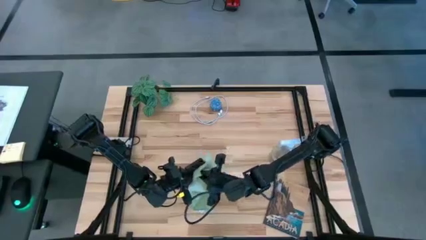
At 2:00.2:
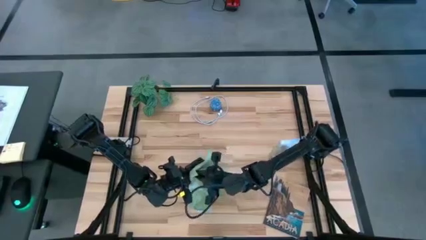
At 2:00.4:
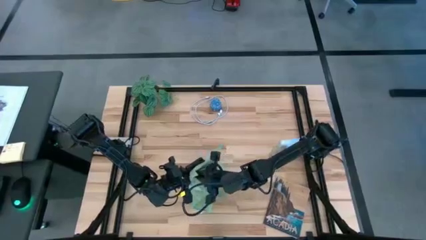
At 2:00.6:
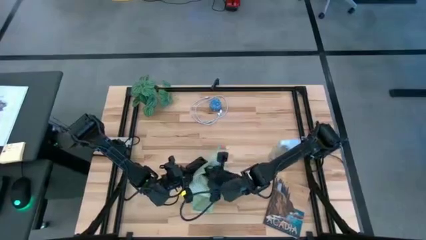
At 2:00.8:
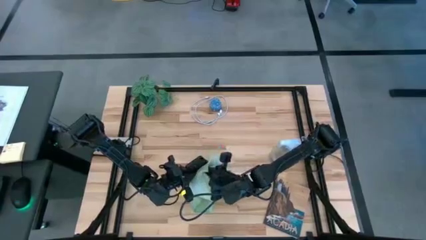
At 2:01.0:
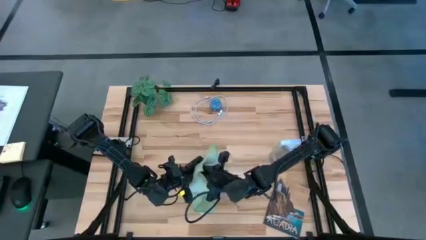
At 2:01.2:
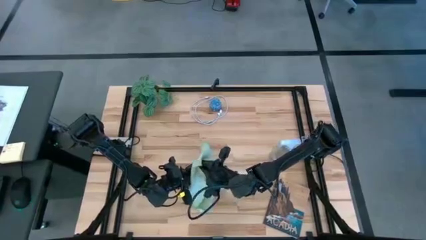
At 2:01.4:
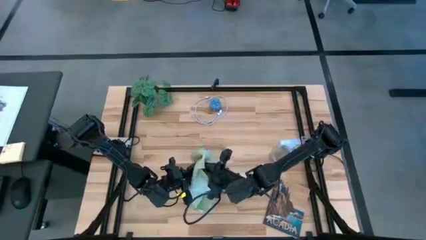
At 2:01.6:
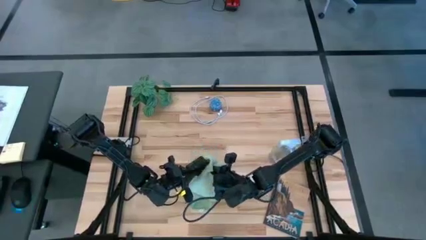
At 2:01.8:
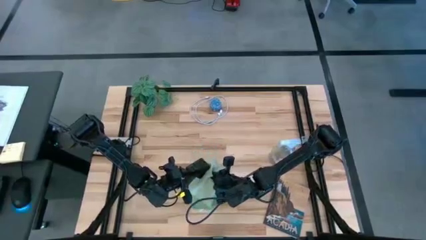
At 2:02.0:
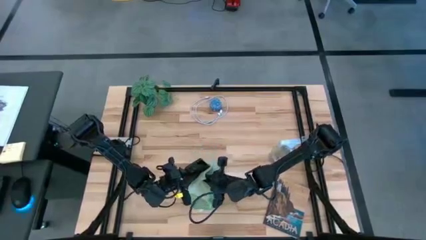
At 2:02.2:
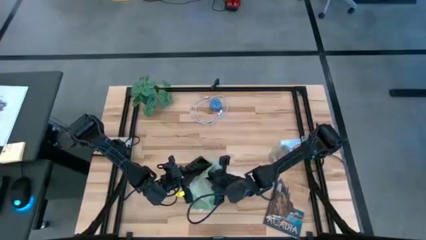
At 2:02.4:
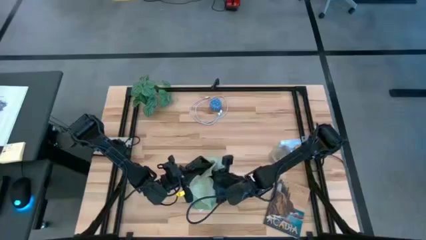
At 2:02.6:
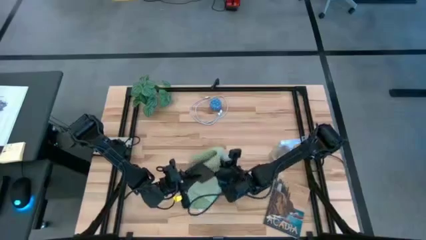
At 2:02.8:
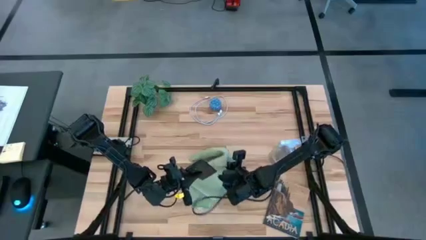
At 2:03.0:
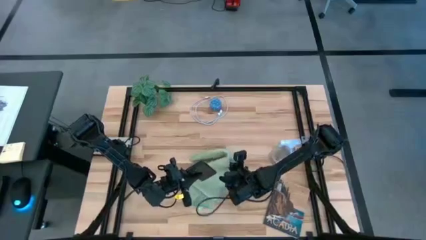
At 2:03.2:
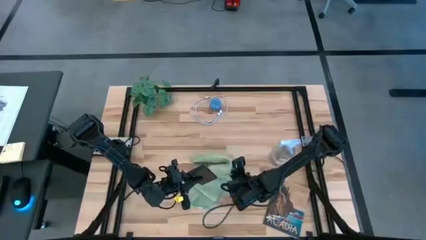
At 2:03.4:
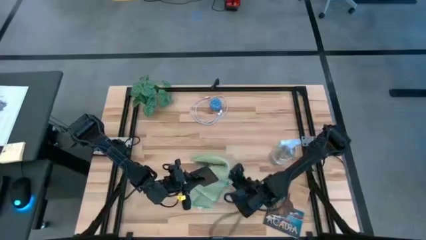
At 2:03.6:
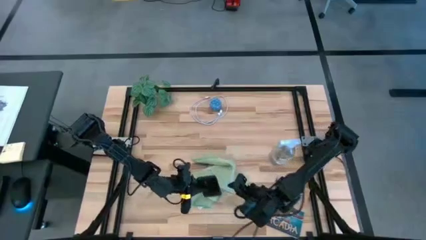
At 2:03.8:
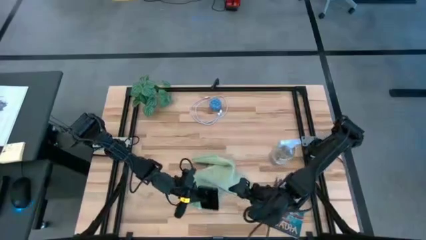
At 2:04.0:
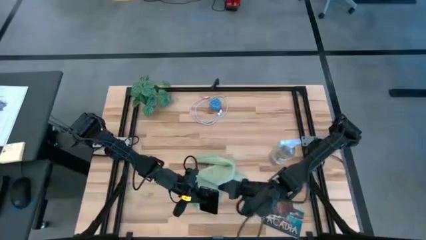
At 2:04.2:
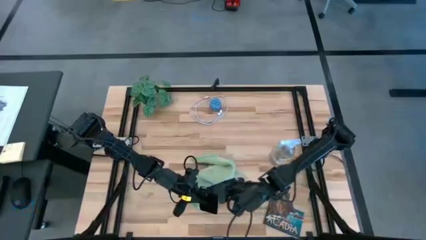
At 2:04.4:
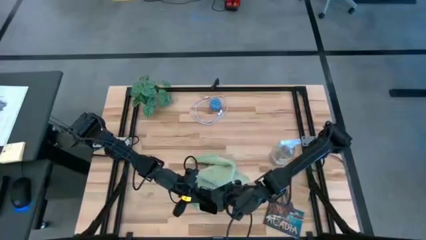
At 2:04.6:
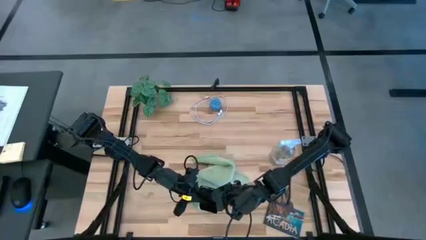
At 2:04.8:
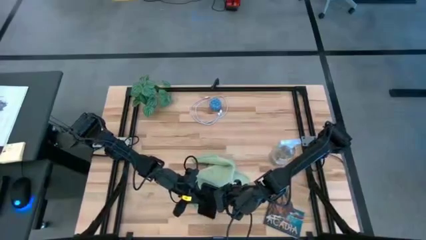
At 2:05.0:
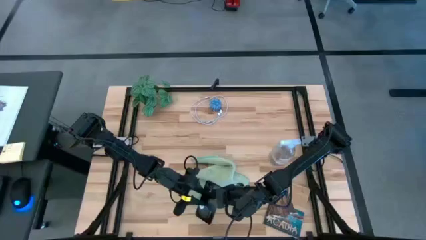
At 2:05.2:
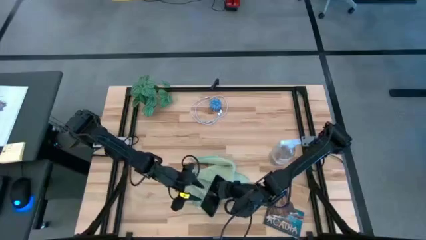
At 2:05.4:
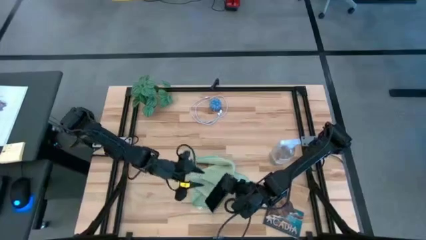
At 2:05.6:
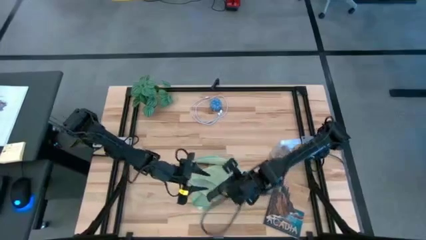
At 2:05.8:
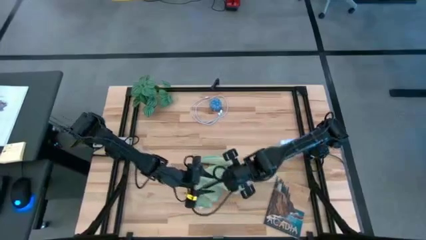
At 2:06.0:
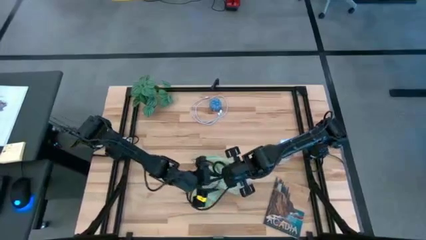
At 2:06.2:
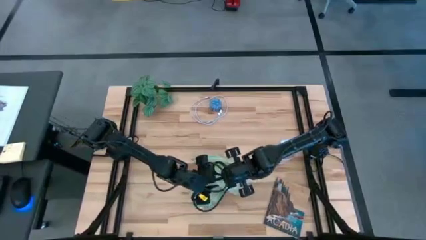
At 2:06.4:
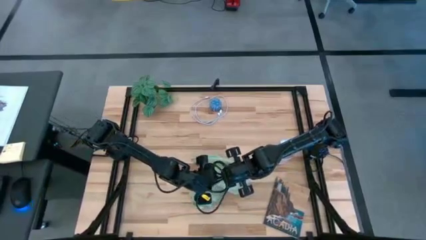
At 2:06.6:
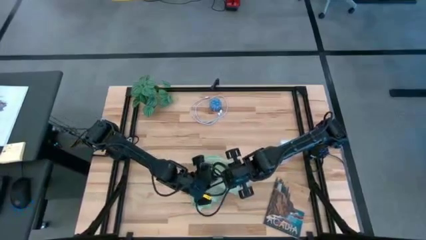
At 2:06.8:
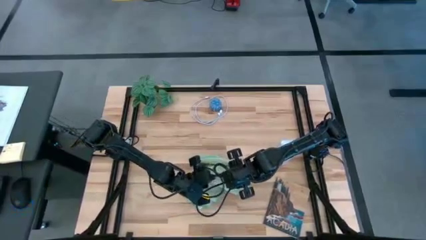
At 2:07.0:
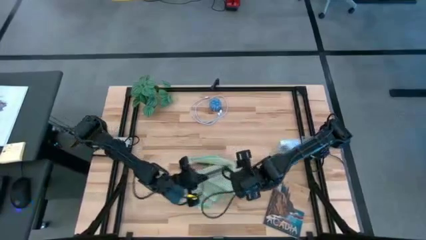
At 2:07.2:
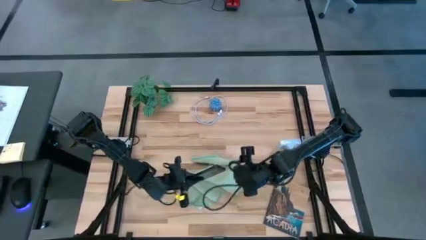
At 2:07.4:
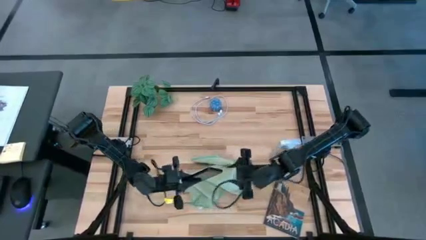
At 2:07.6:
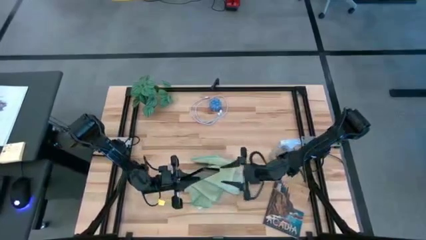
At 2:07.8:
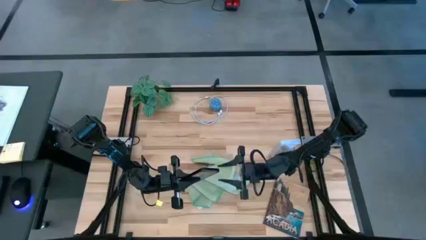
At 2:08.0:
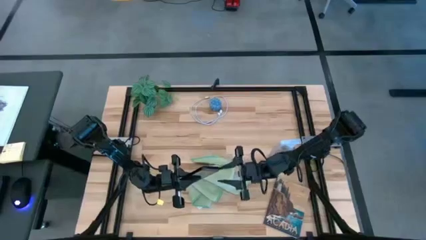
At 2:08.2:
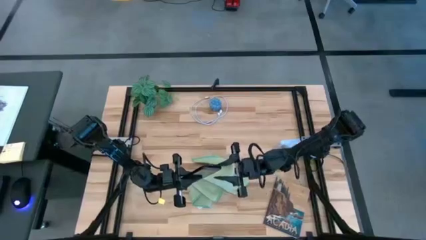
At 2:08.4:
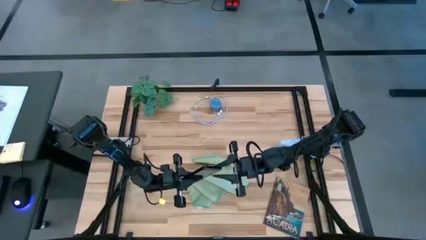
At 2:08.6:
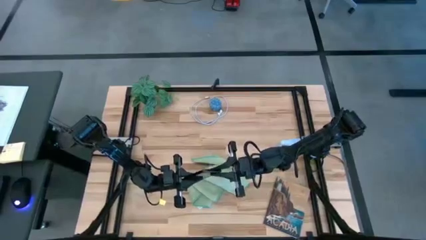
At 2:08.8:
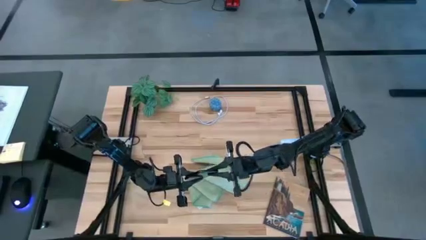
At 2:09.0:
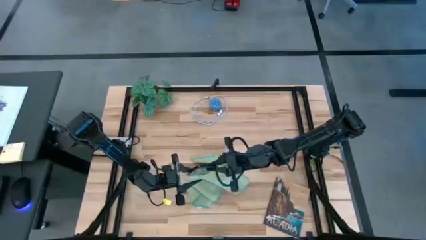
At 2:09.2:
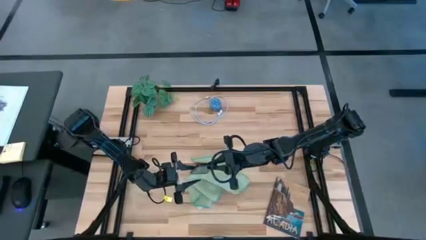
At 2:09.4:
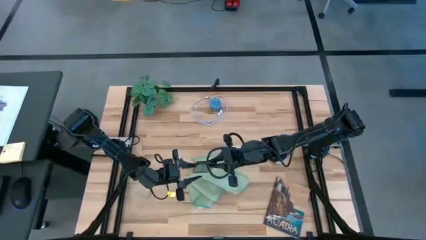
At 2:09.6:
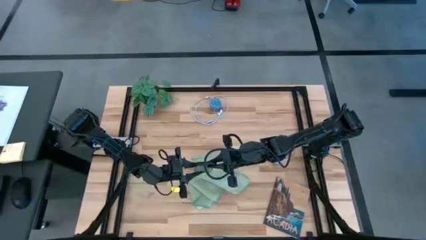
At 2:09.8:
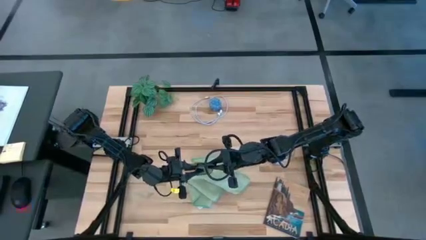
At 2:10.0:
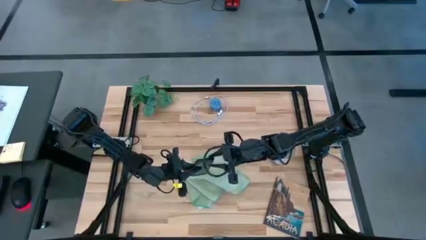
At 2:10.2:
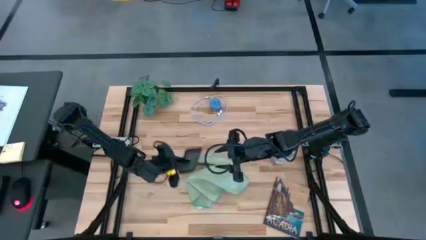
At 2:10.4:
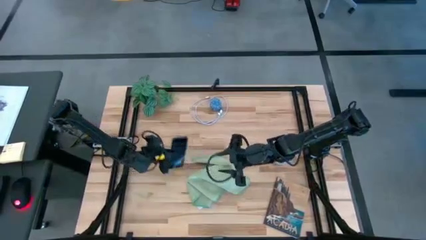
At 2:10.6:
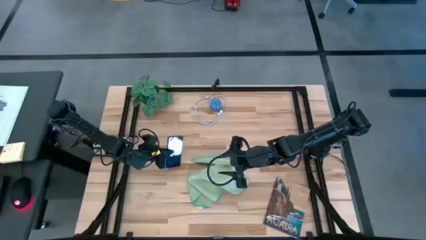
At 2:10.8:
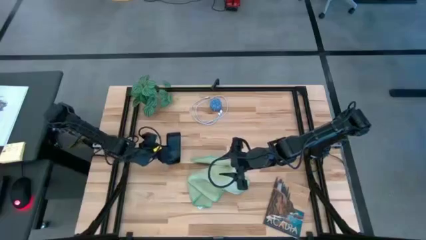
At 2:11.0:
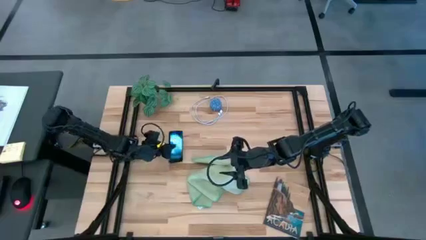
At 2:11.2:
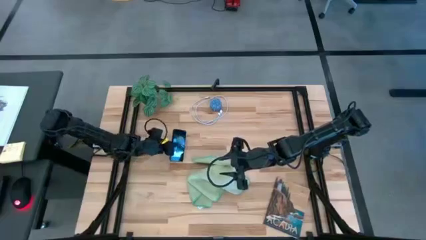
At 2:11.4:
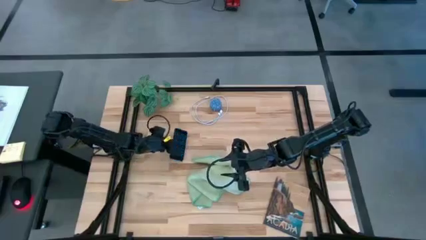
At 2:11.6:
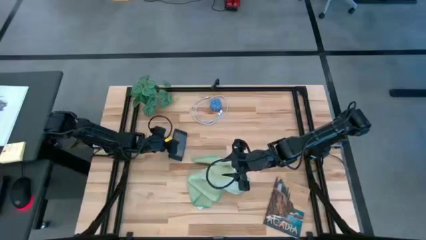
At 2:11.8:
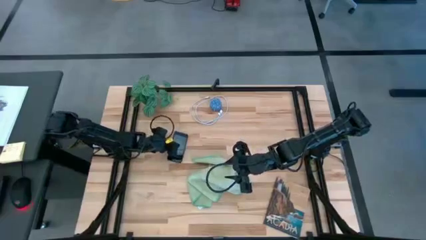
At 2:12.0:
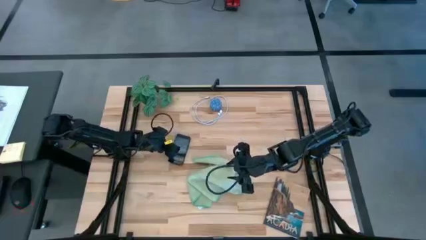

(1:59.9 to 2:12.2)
Task: Apply microfiber cloth
Wipe the back of the phone with the light green microfiber cloth
